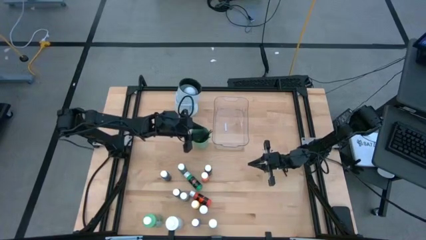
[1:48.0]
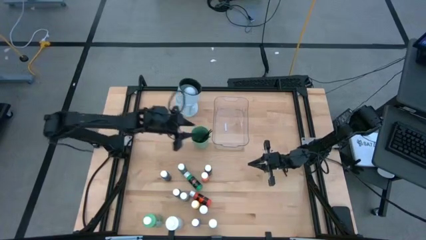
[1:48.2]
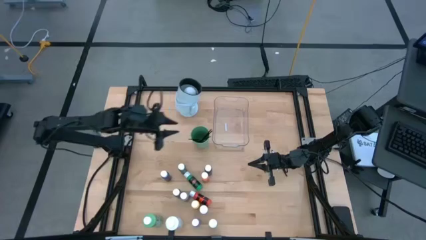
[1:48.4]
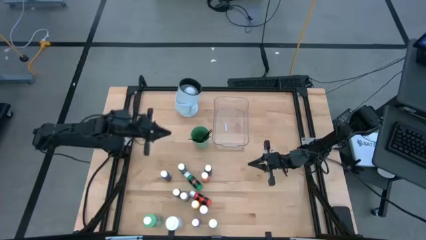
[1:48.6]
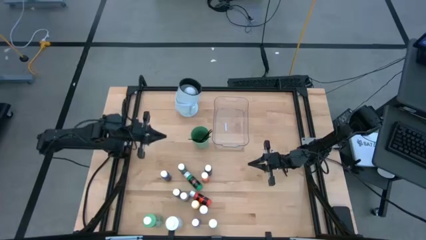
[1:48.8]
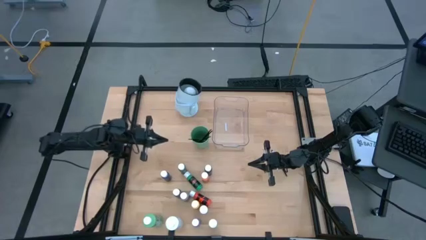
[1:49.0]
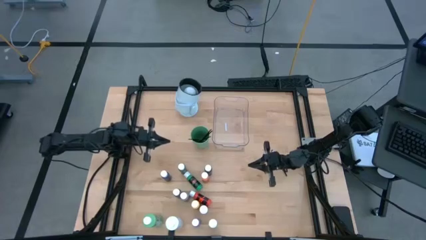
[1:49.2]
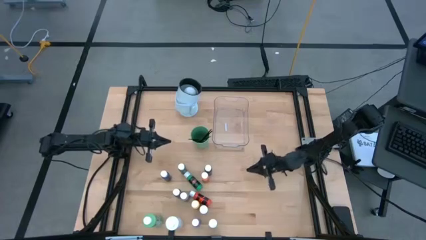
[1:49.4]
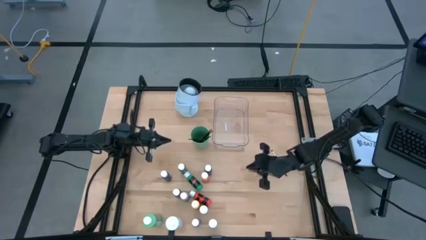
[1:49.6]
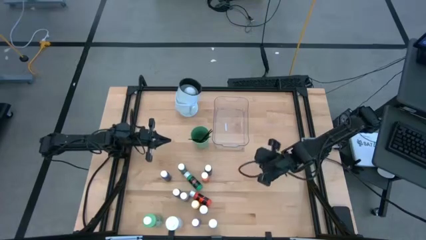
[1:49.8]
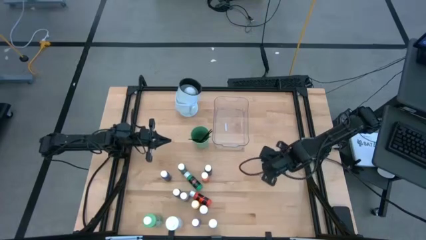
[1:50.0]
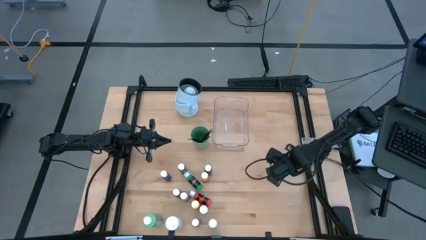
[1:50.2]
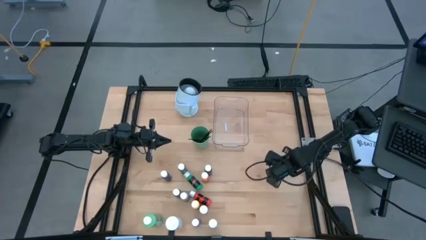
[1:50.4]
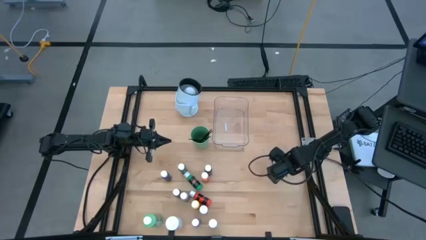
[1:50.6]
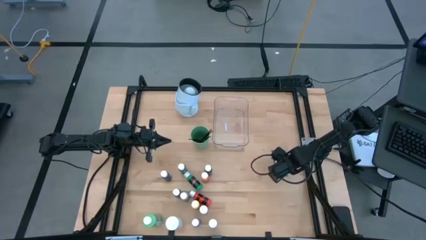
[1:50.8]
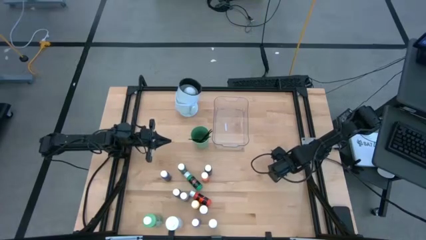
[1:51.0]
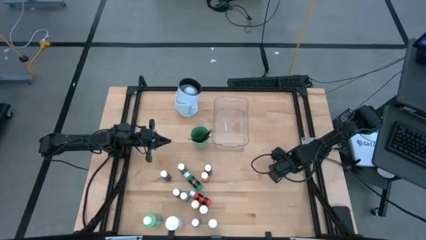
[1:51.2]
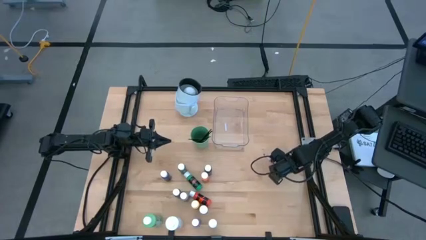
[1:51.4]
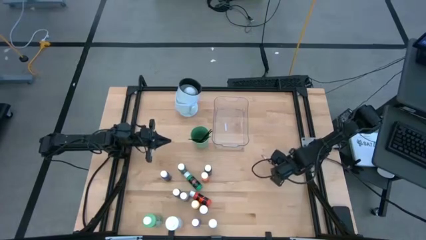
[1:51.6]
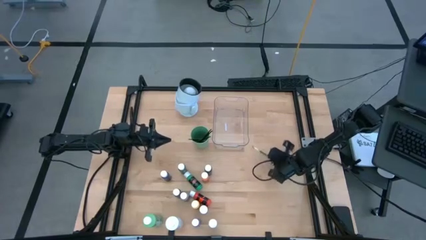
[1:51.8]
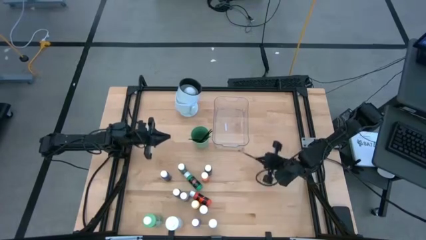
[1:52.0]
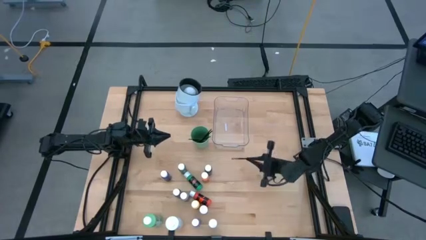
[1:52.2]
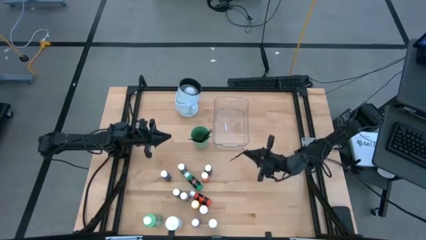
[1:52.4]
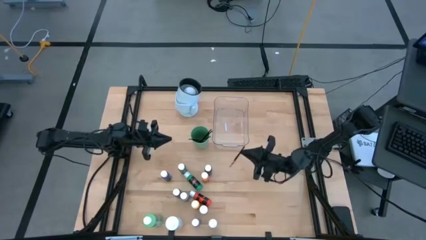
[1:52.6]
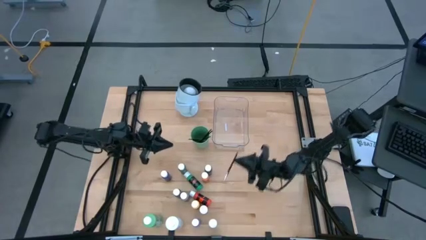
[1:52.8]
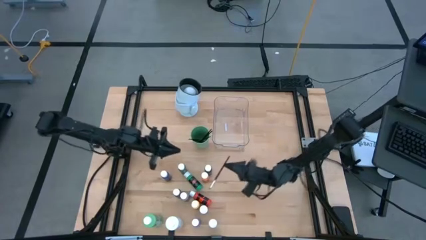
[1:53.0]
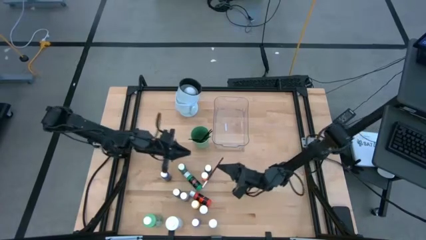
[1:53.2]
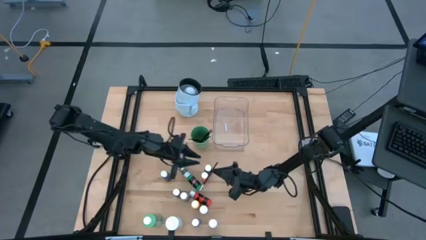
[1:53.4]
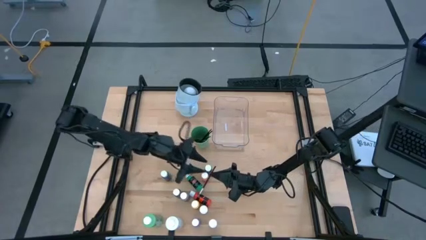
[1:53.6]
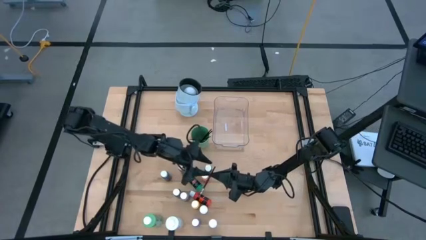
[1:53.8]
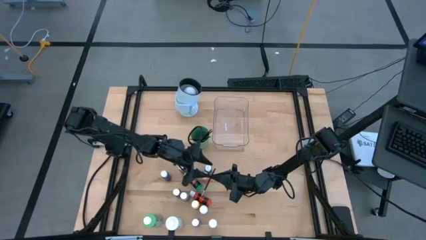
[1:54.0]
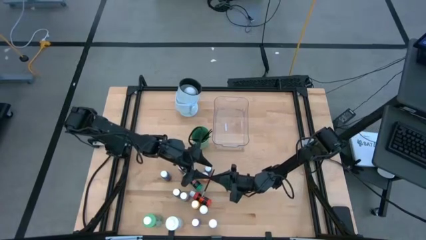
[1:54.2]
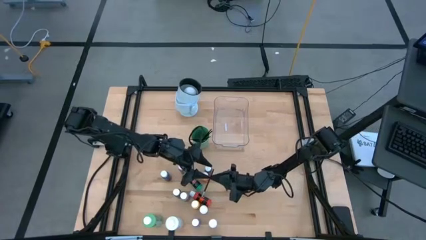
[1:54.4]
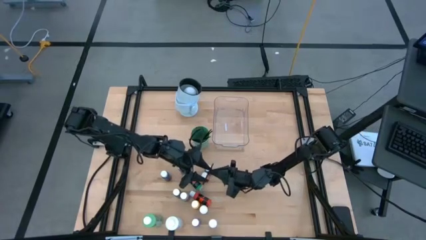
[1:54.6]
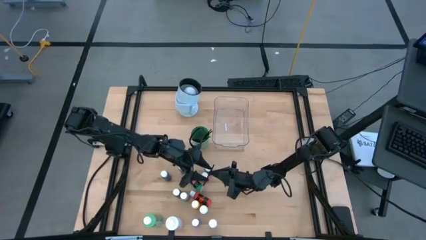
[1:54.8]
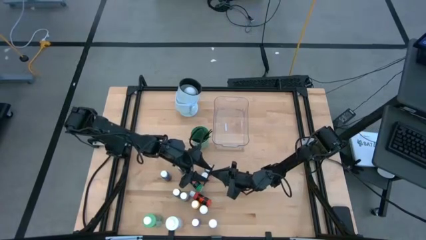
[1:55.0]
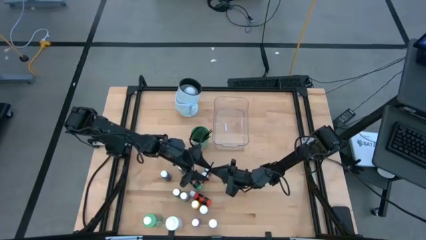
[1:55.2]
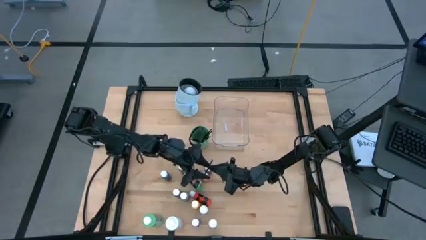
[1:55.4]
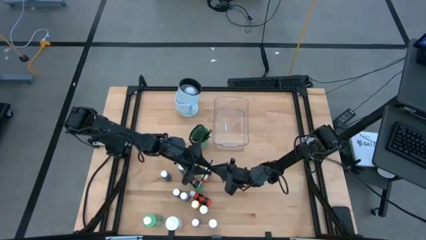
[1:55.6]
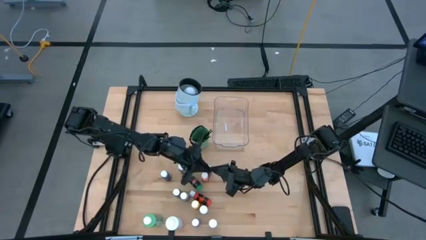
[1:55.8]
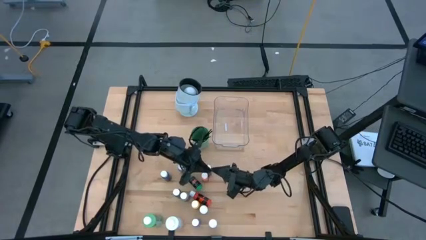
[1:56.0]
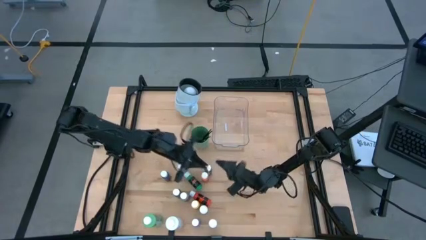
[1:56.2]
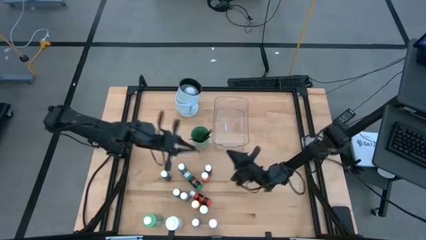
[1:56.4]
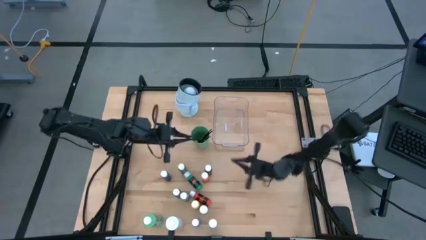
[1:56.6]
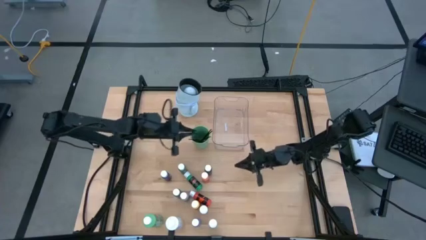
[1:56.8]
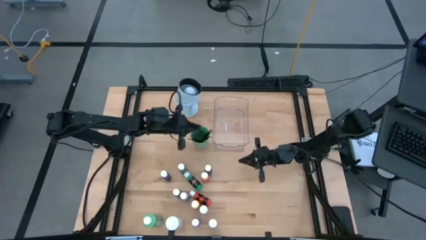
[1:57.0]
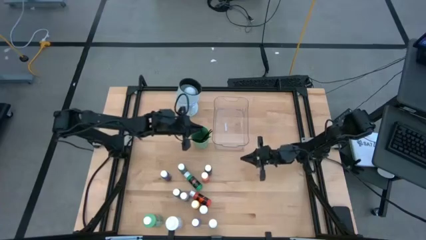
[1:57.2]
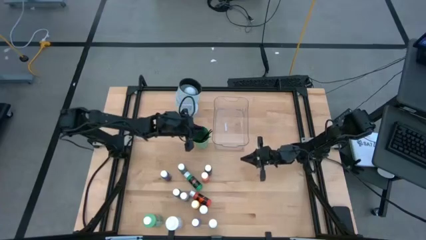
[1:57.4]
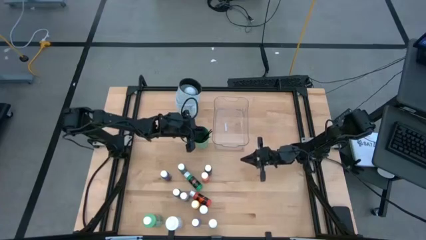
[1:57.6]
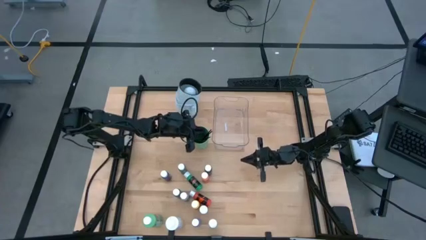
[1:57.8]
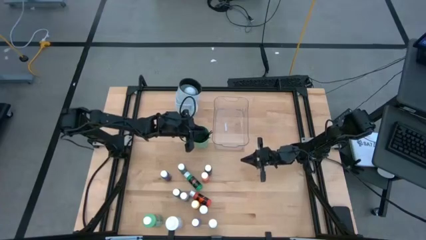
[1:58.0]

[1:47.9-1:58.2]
Task: Pick & Place Paint Supplies
Put the silver paintbrush into the green cup

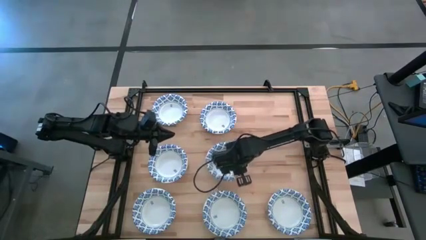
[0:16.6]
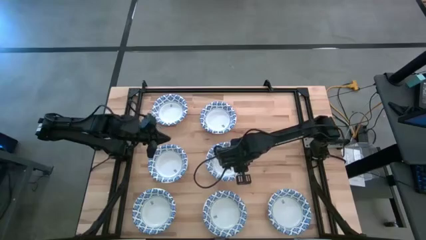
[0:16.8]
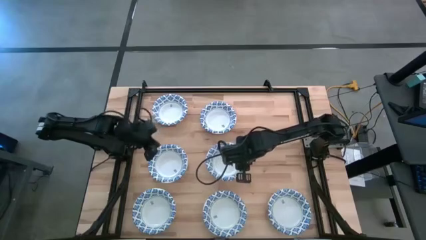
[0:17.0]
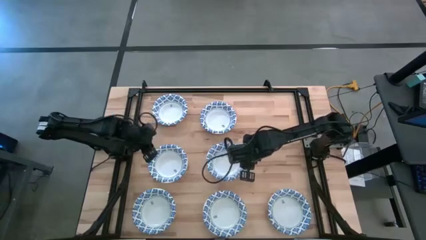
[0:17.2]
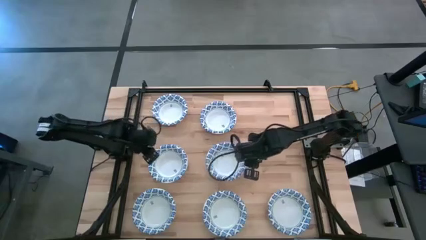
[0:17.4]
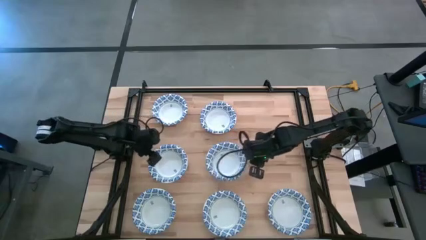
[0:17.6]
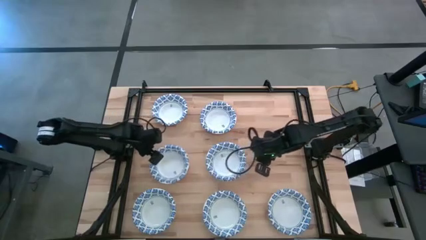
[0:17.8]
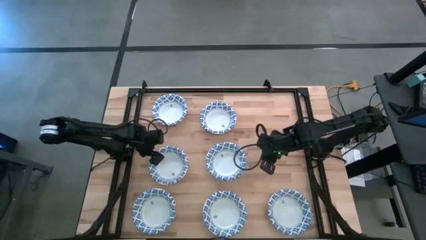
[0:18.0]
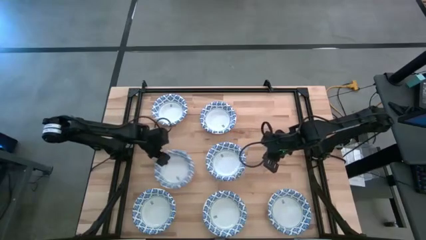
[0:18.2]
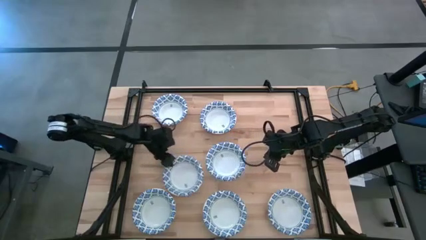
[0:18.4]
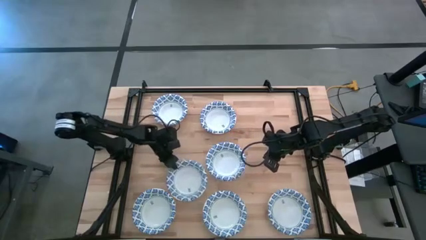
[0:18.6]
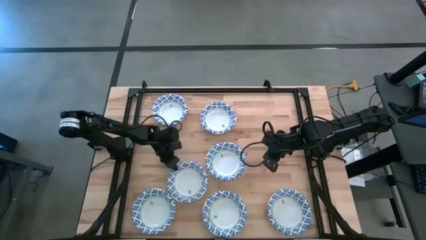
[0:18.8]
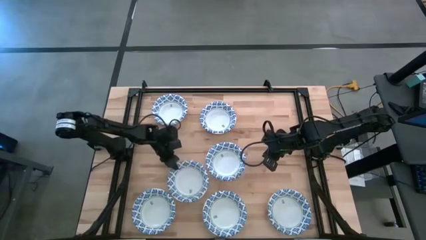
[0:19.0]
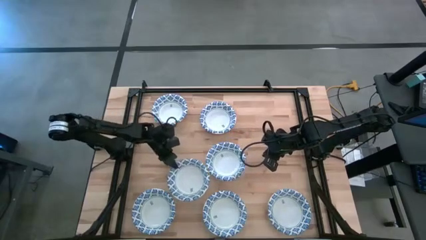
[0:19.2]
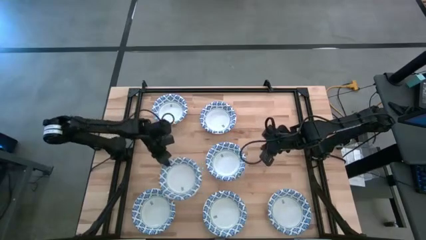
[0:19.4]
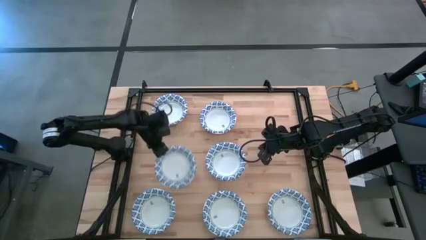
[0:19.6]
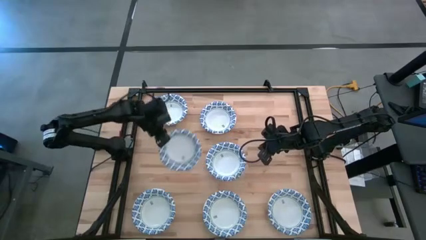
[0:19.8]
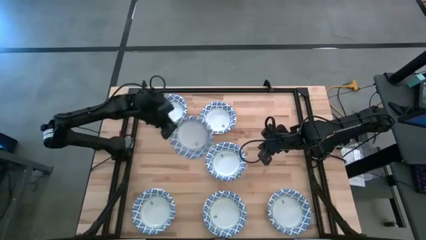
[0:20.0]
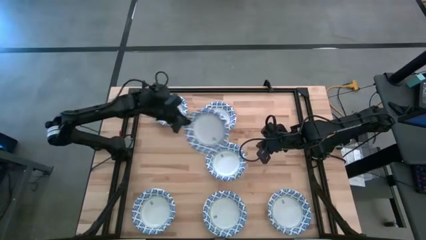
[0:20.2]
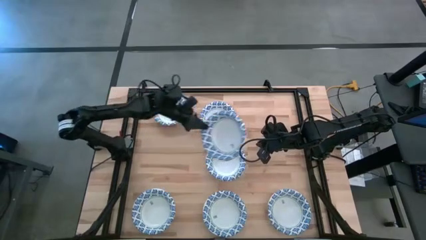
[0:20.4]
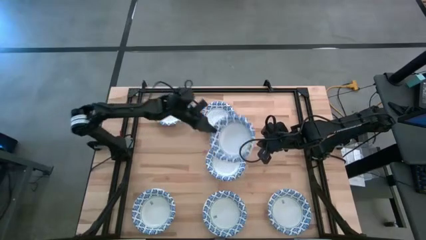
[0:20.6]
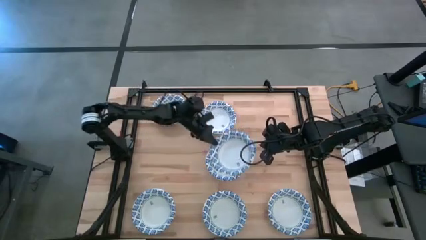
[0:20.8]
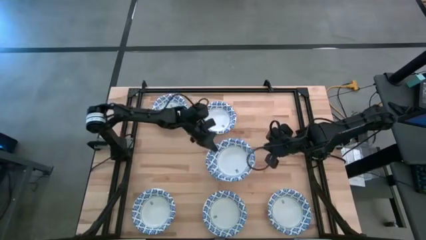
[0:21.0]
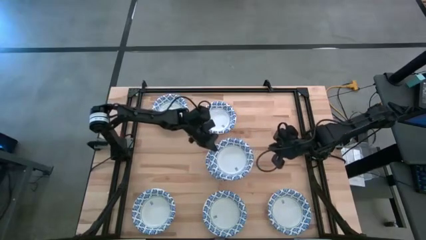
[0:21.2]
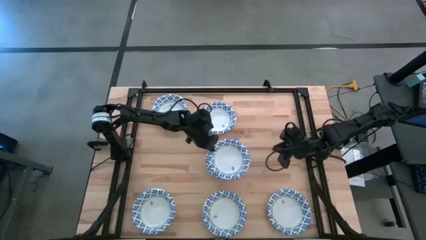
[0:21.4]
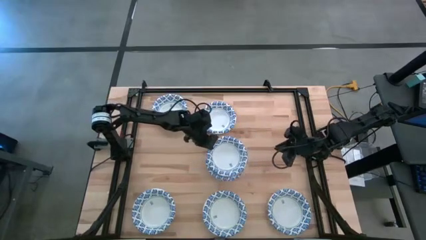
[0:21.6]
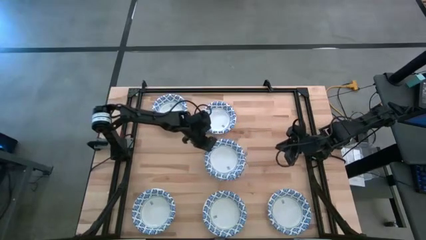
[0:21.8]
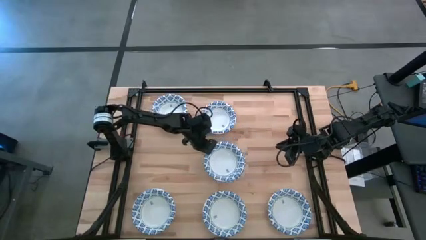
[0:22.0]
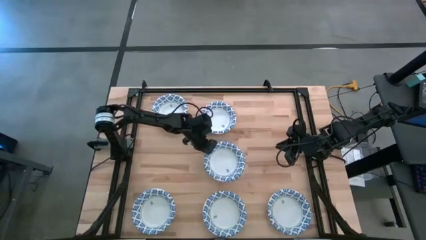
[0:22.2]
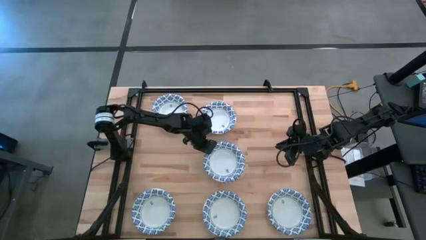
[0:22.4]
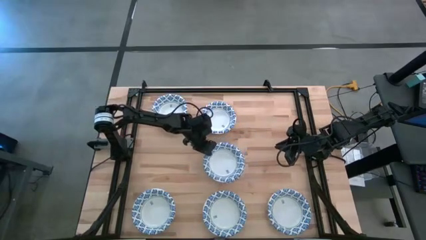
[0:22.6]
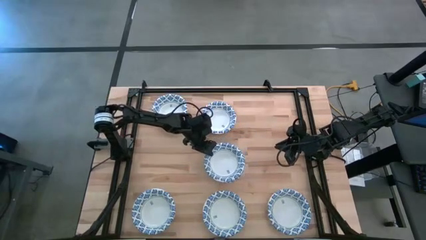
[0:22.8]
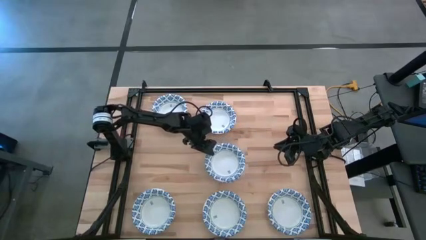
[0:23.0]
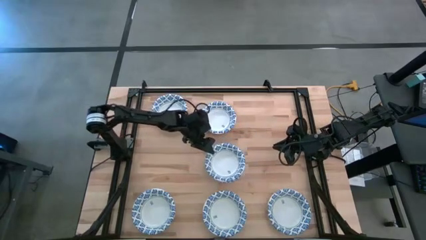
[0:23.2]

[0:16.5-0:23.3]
Task: Nest bowls inside each other
Stack the white patterned bowl on the top of white patterned bowl
